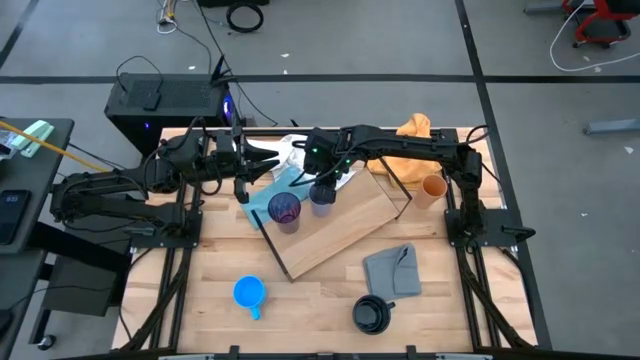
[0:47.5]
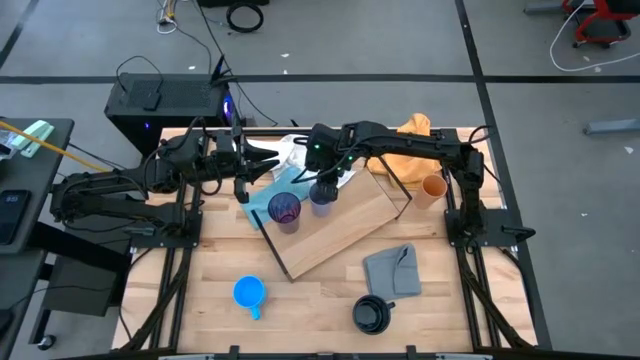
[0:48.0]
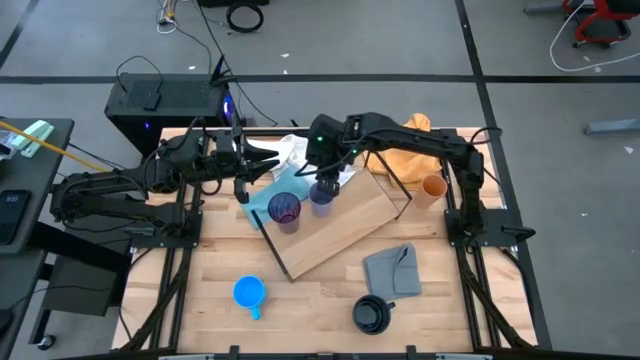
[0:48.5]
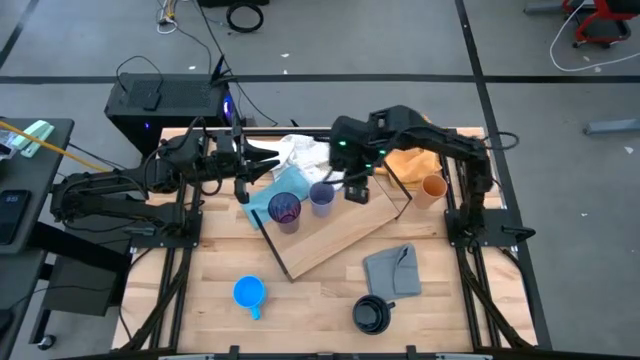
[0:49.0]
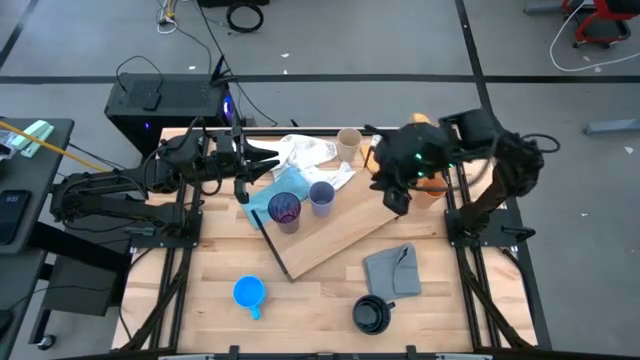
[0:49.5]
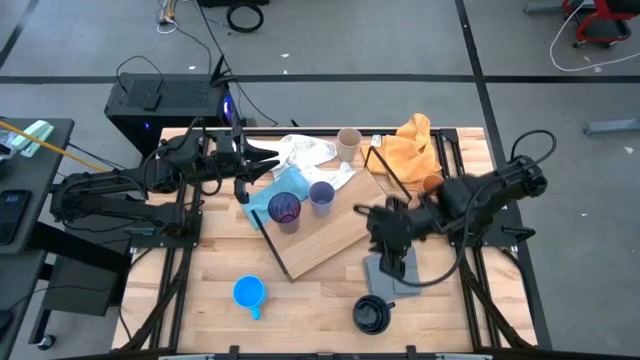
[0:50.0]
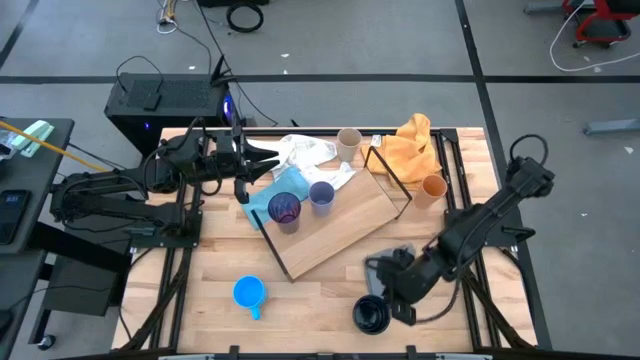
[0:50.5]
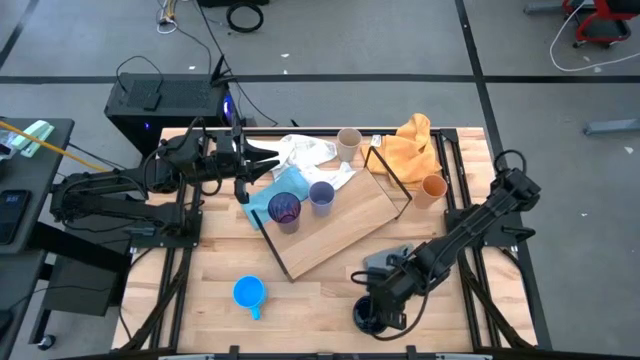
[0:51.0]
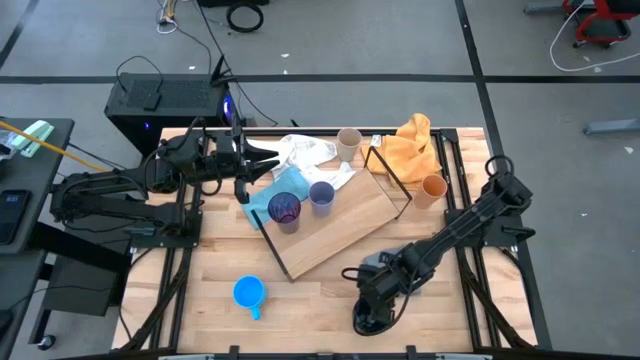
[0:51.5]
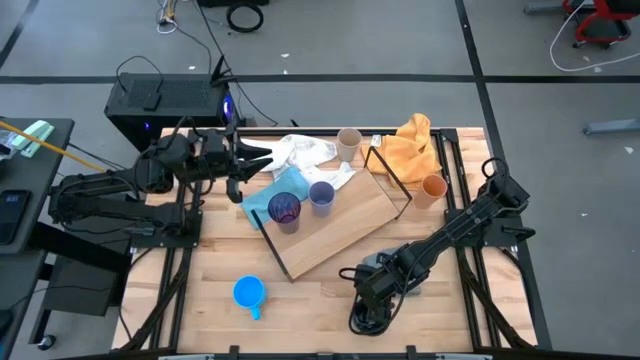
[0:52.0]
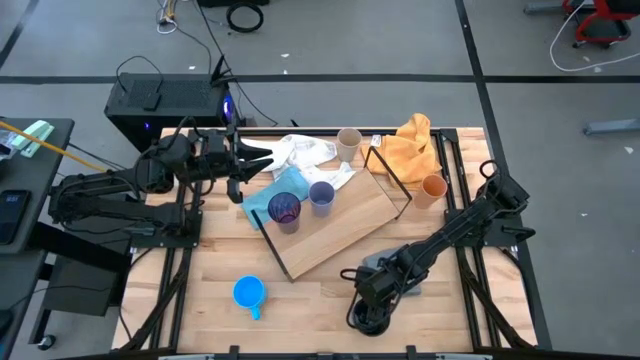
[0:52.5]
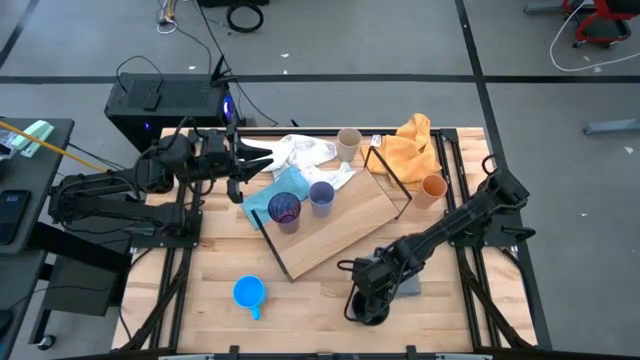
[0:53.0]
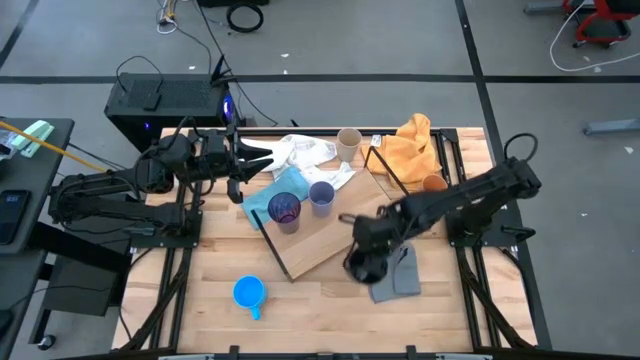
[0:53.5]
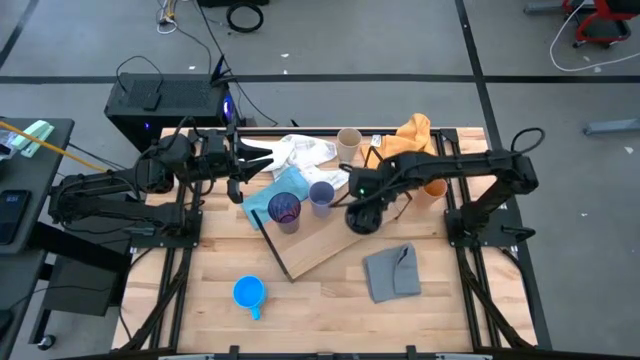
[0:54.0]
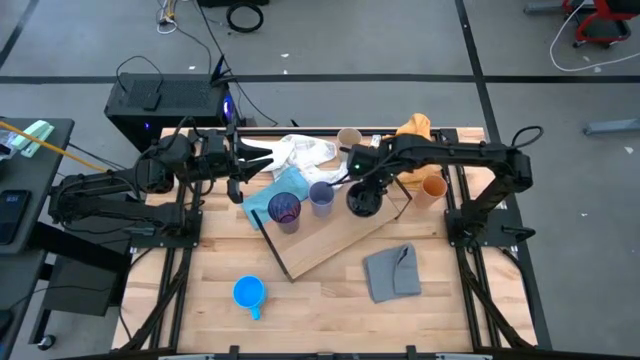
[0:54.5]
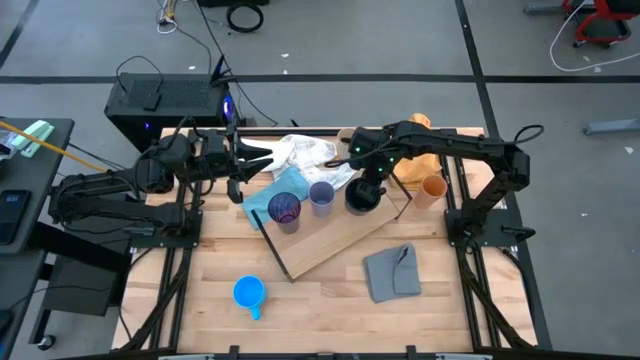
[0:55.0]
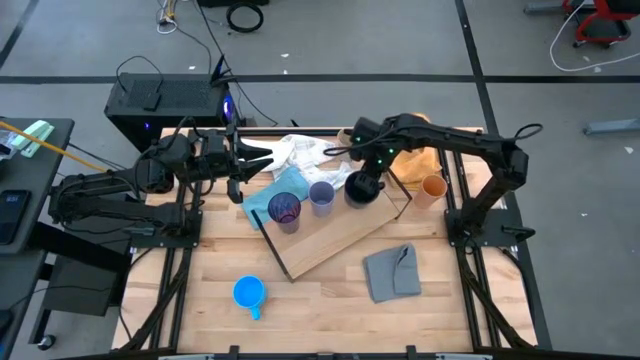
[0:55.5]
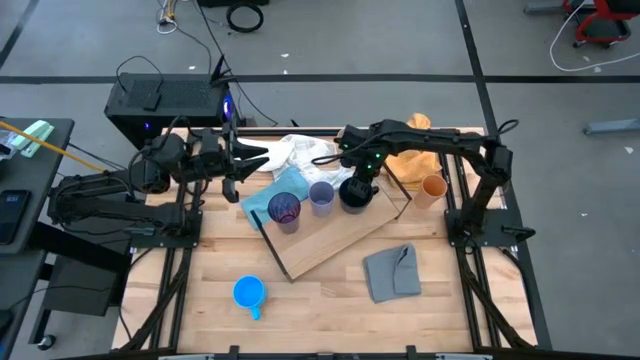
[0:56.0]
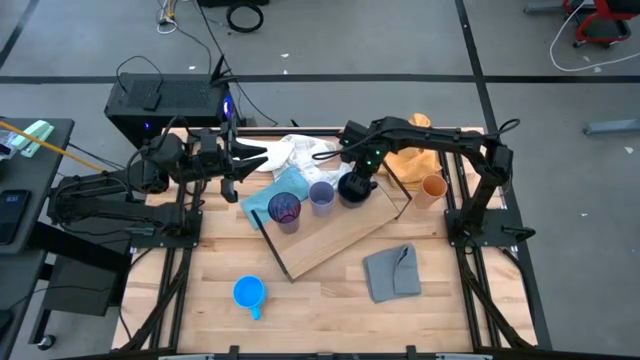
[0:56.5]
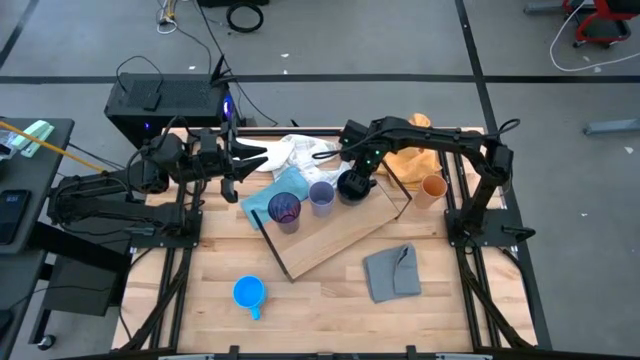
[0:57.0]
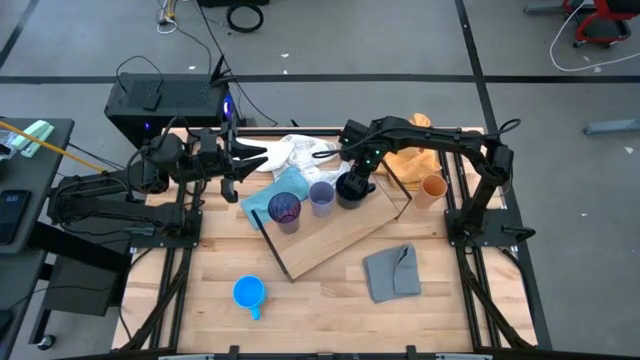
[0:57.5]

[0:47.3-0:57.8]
Task: Stack small to large cups/mugs on shelf
Put the dark blue mug on the shelf

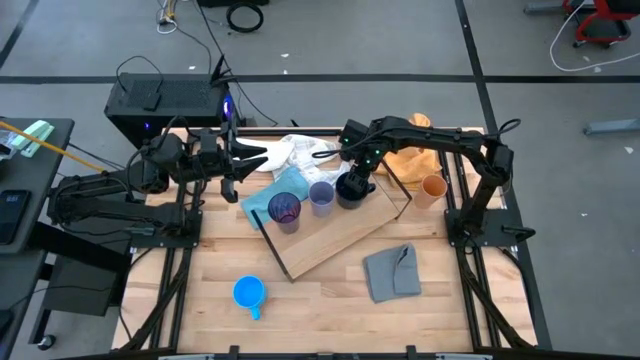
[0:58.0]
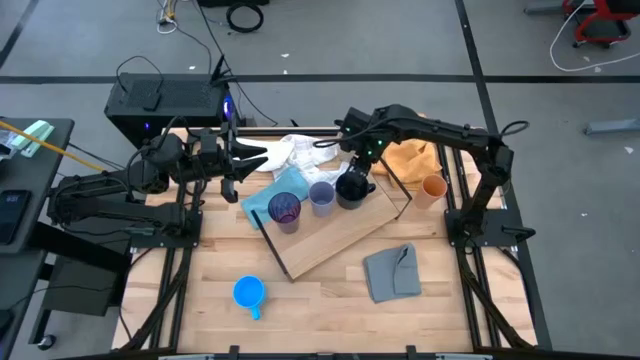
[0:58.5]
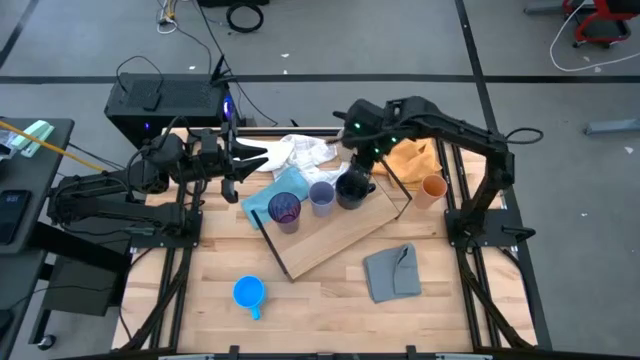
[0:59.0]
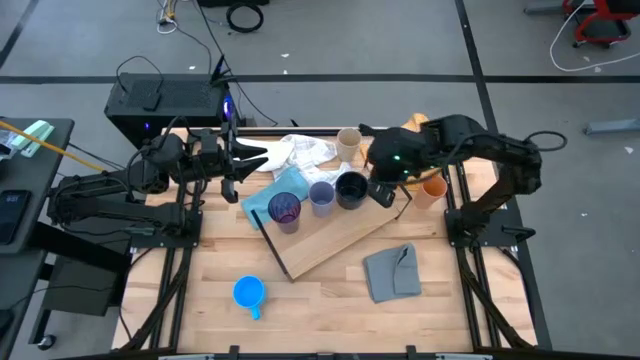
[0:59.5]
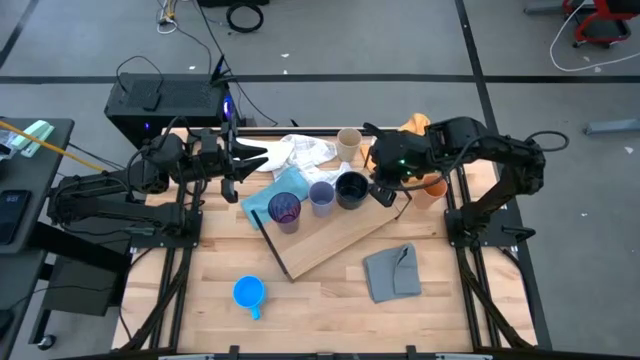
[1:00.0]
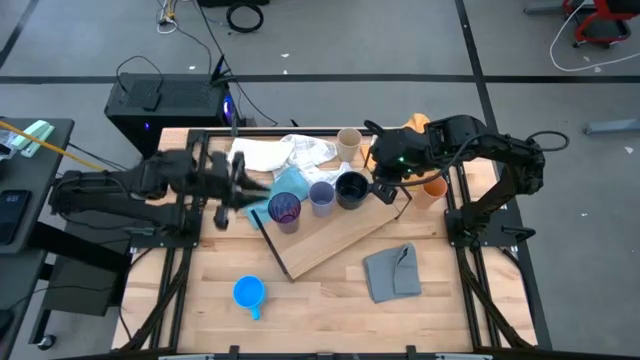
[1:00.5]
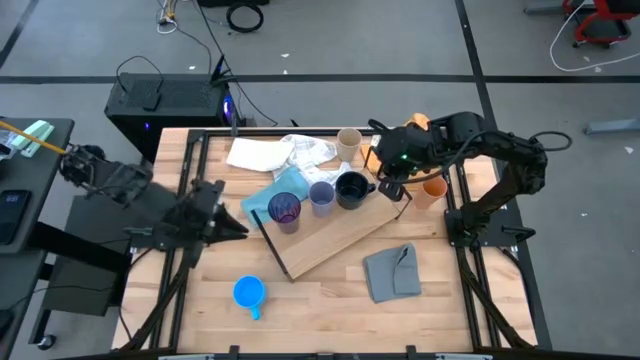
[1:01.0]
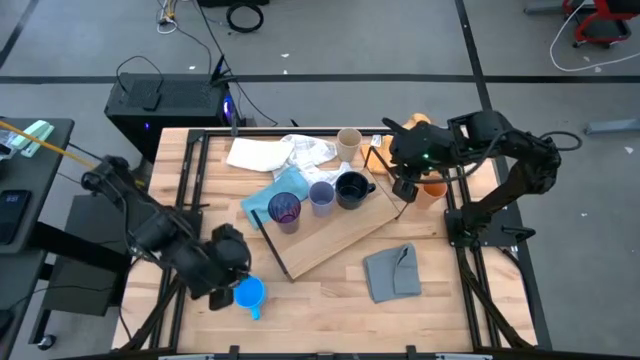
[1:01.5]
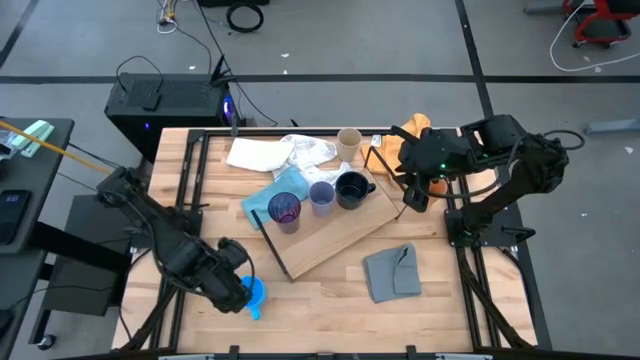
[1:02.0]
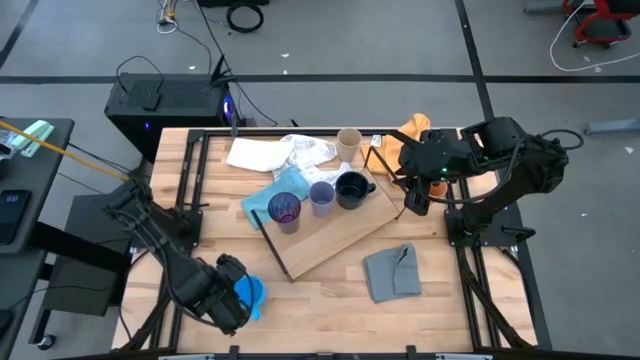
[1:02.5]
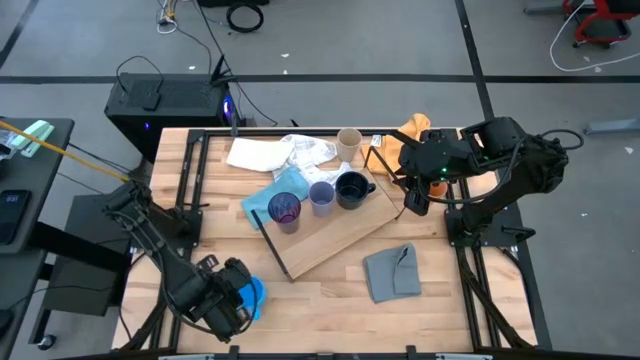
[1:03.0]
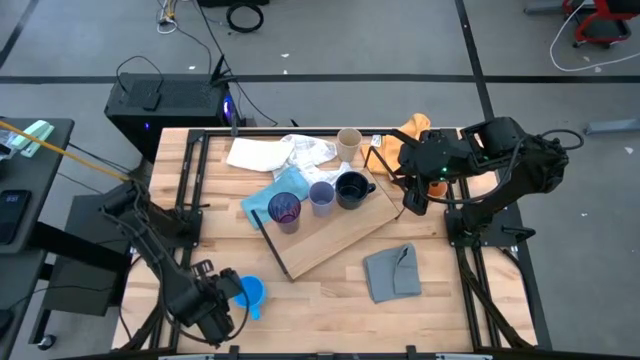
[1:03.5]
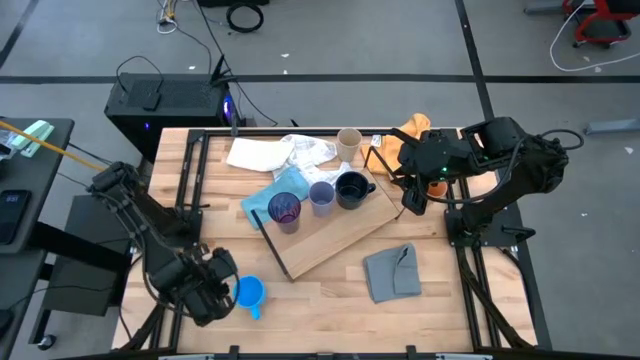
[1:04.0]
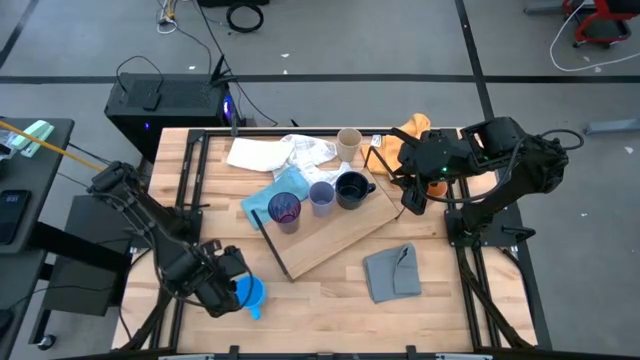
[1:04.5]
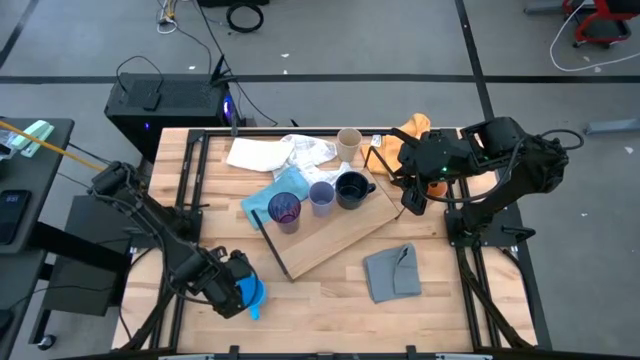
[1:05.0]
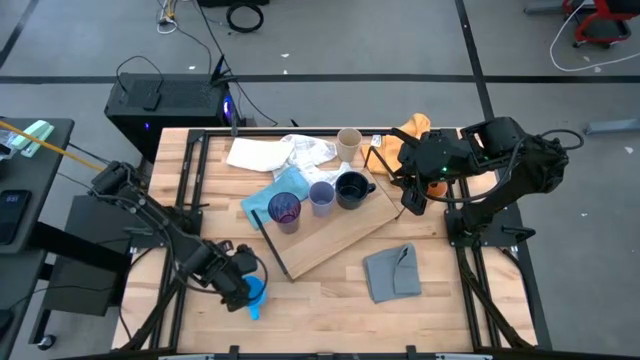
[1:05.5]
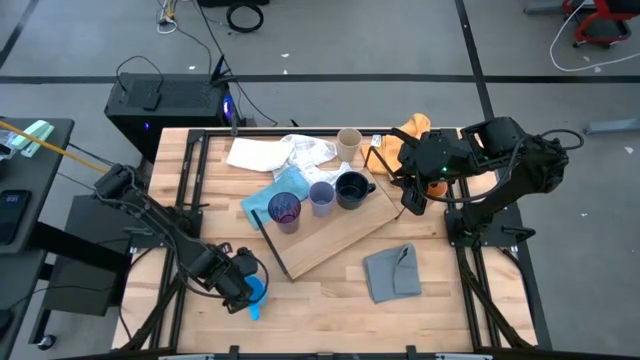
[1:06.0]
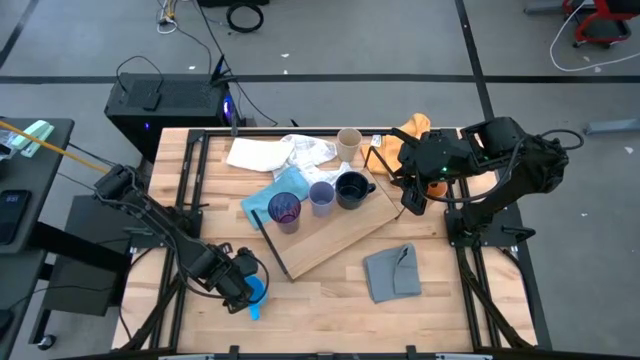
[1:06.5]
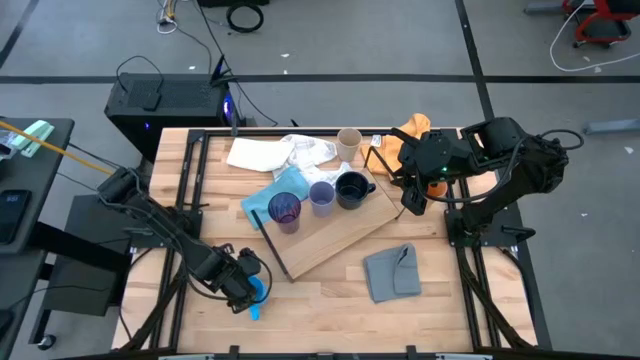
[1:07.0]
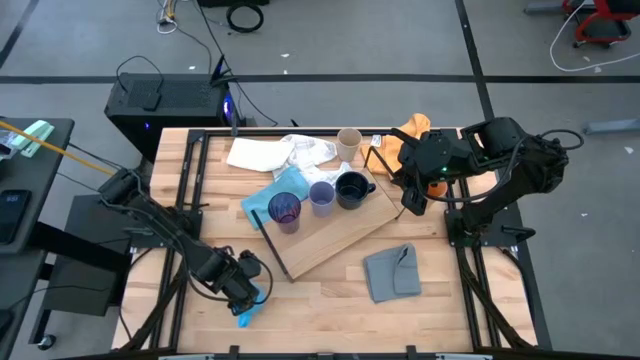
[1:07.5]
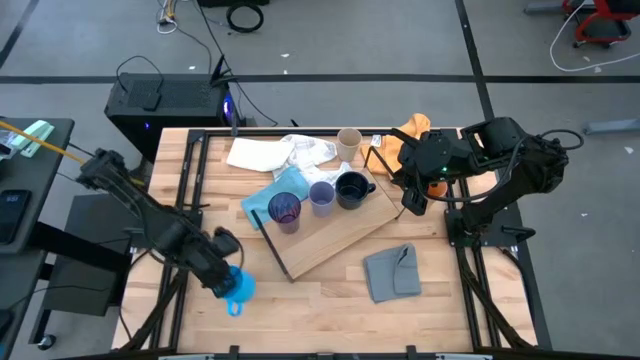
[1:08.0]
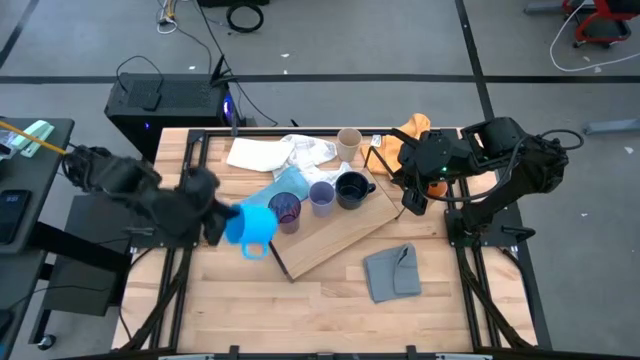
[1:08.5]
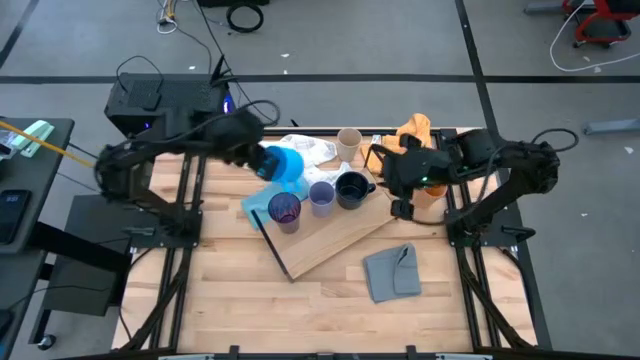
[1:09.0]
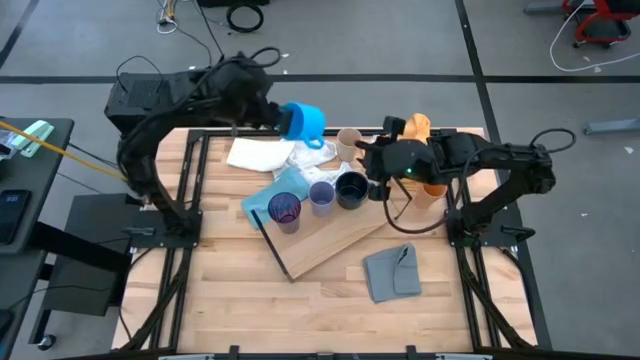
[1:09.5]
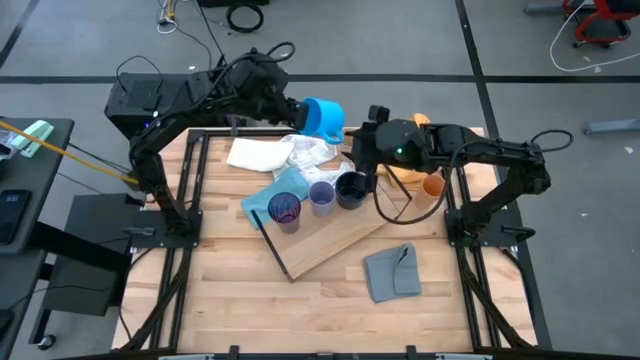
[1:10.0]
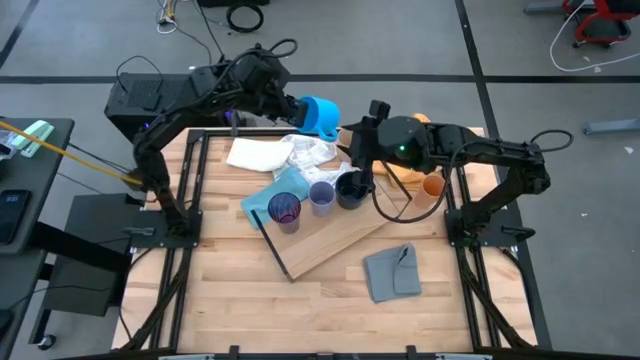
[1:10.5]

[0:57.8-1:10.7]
Put the blue mug on the shelf
